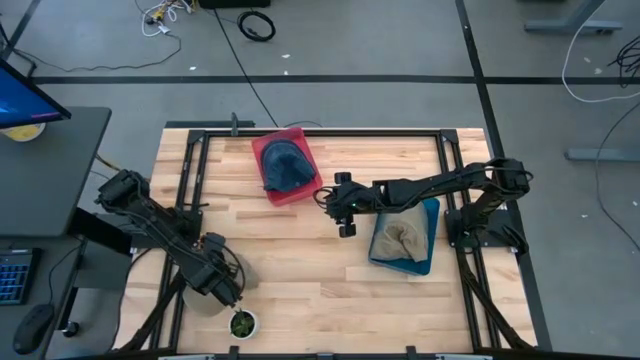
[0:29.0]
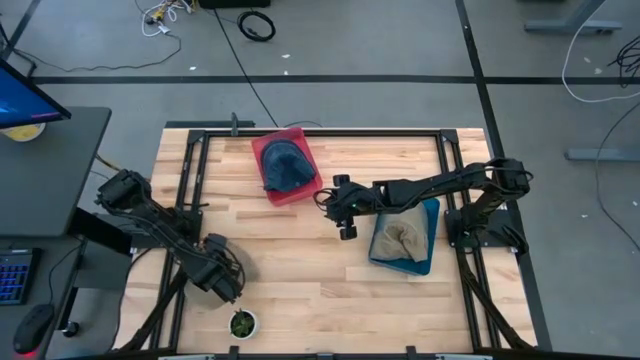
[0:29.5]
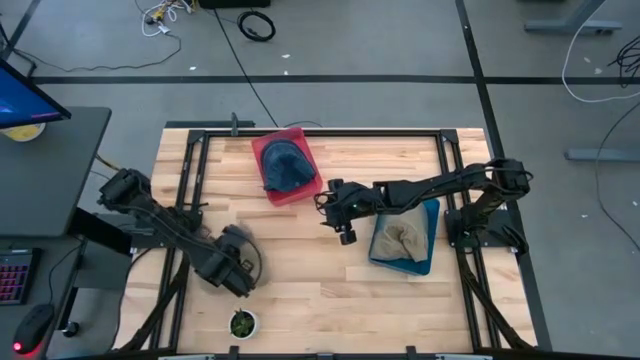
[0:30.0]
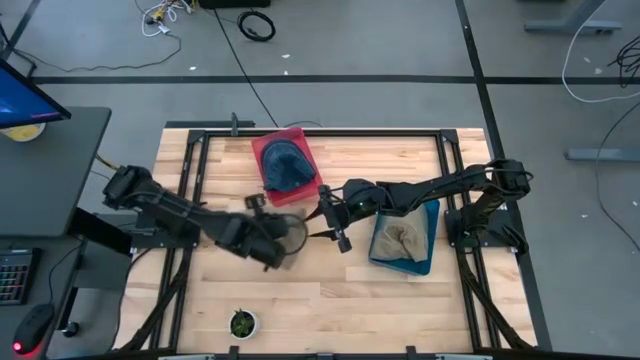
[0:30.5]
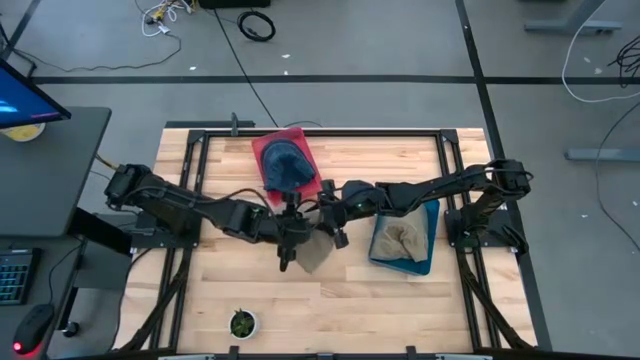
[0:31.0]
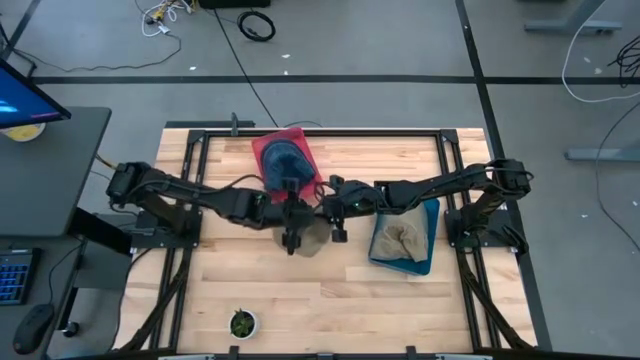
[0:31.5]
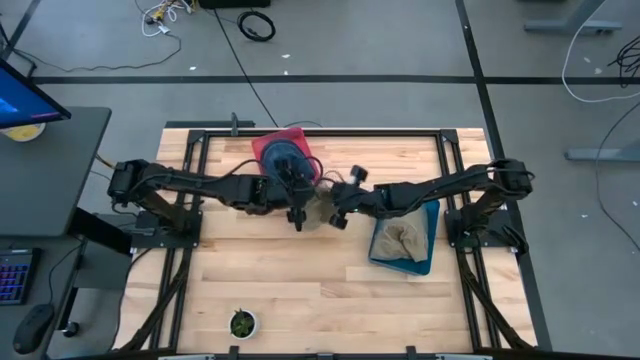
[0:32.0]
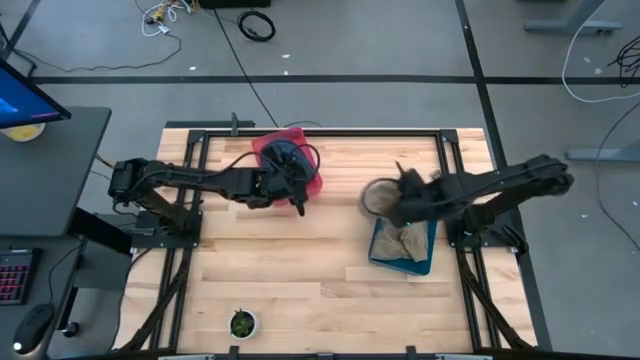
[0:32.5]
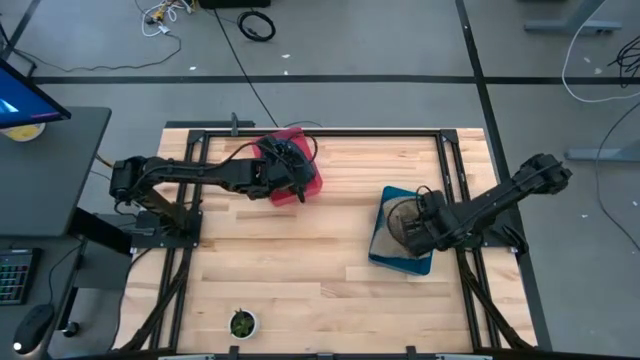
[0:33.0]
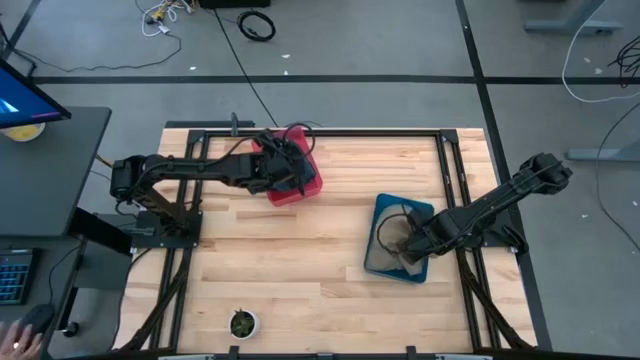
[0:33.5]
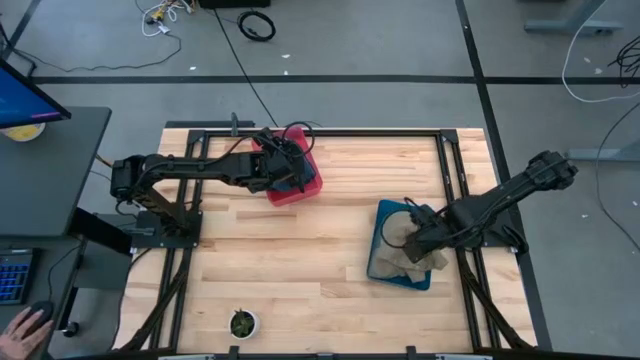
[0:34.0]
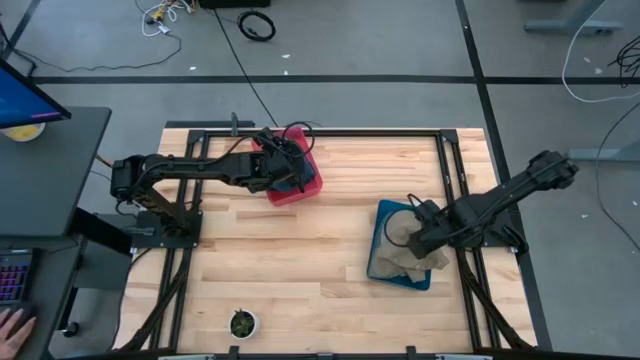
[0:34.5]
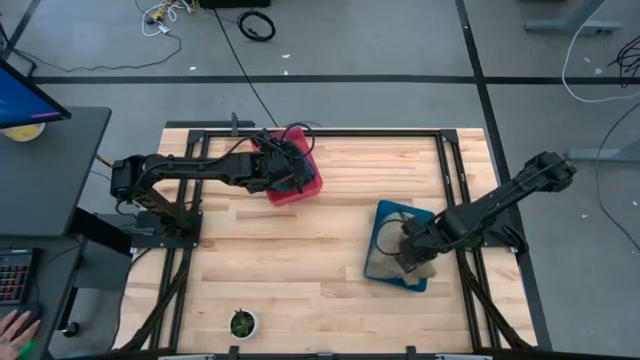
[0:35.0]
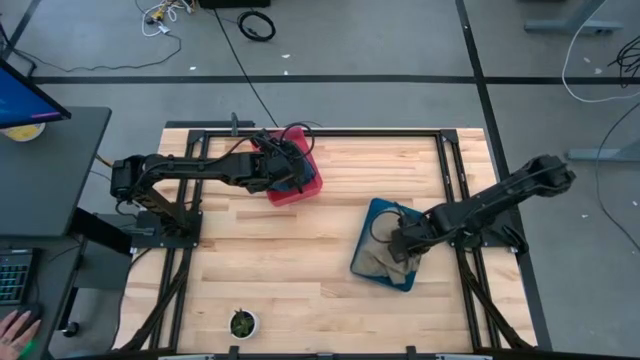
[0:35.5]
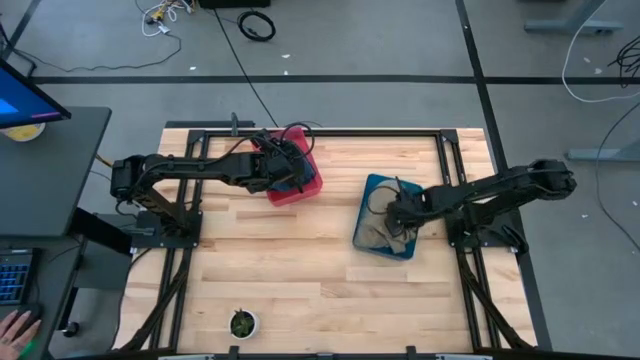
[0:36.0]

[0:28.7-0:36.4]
Task: Pick & Place hat
Put the brown cap into the blue bin

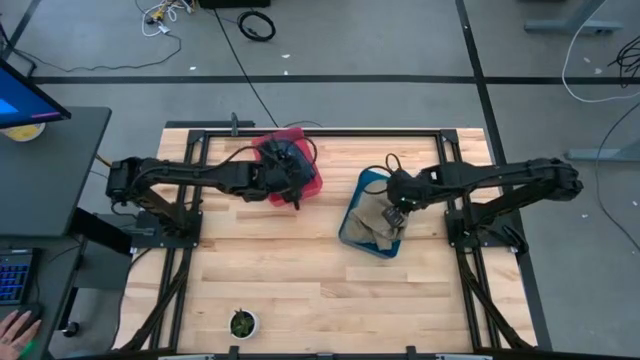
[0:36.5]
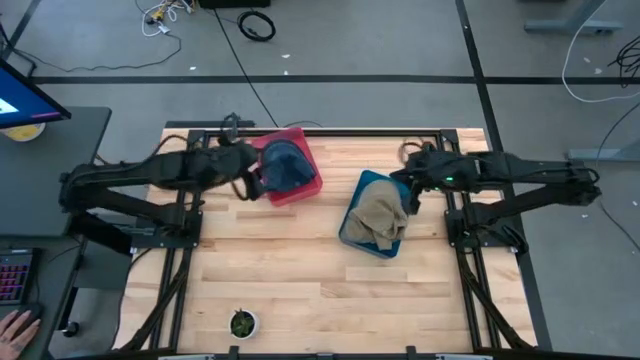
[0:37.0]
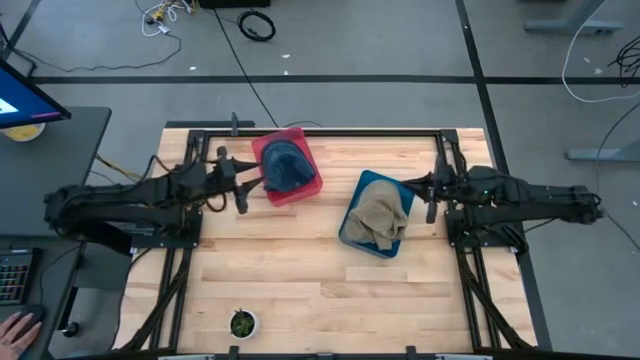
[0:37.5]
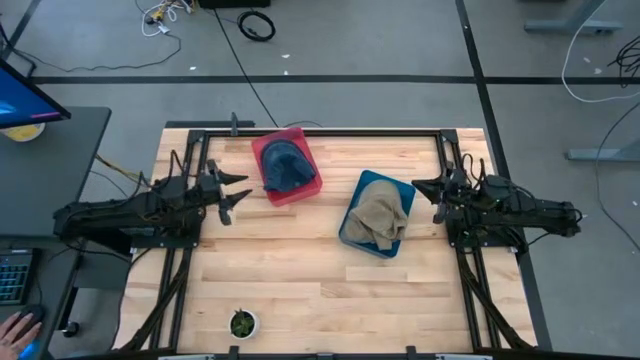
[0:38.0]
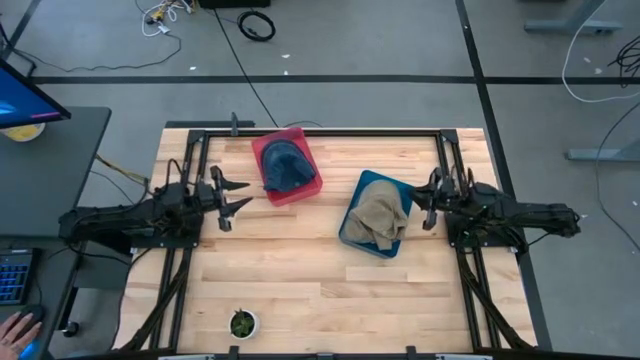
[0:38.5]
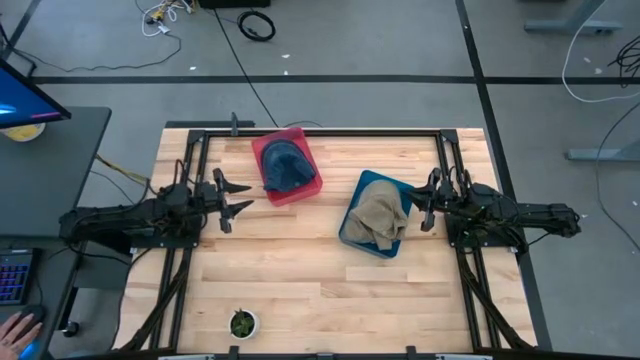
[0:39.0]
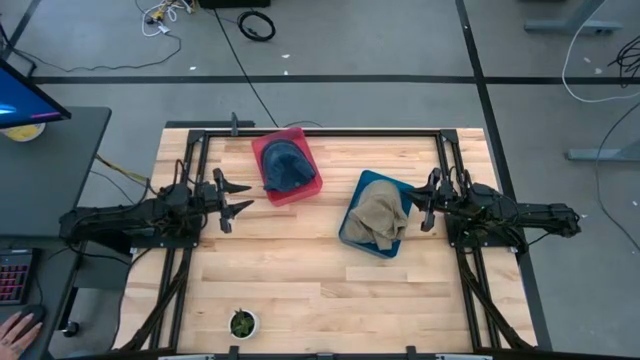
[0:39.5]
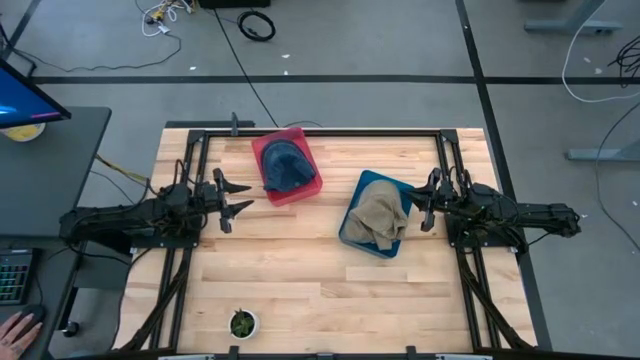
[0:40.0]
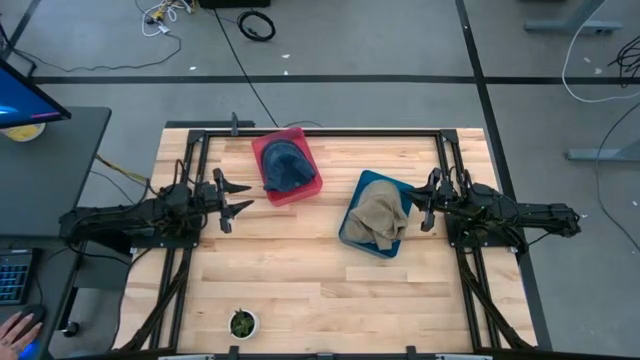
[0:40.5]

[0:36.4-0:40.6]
Return to Home Position

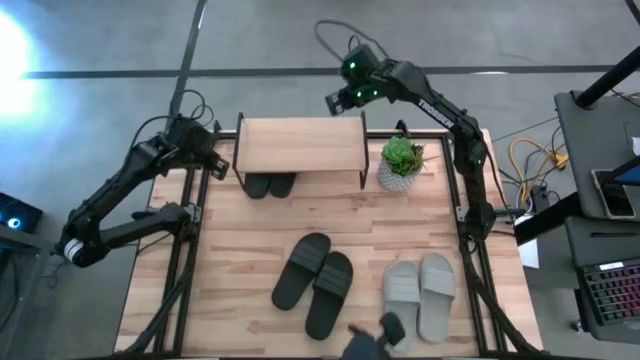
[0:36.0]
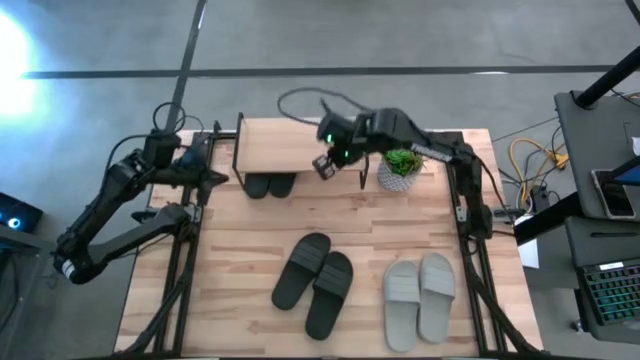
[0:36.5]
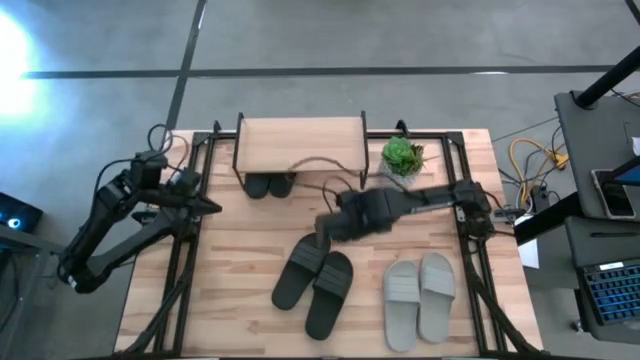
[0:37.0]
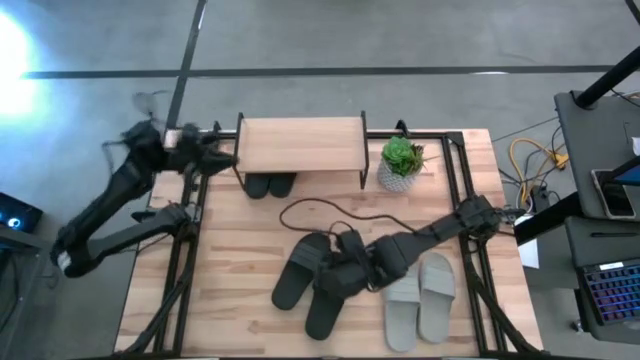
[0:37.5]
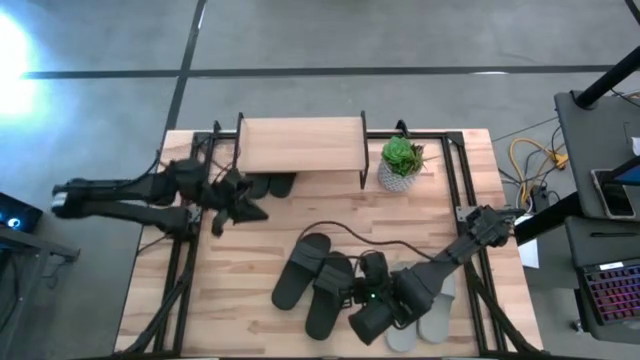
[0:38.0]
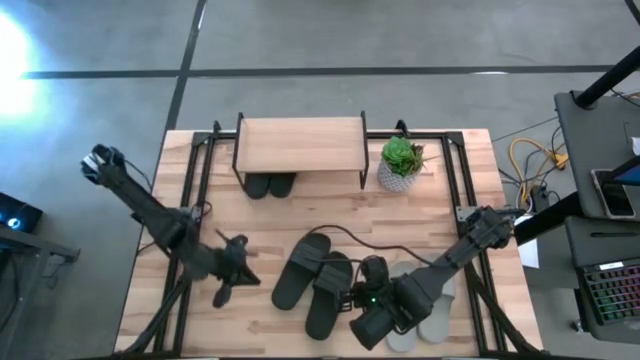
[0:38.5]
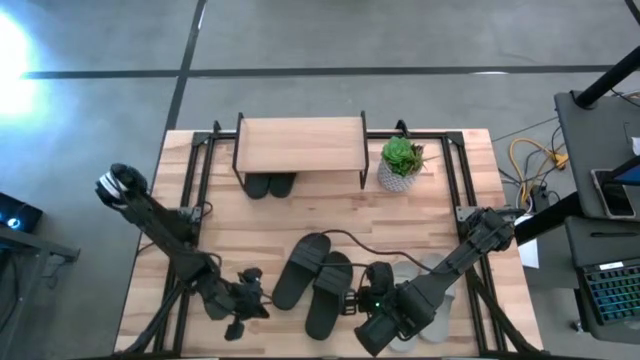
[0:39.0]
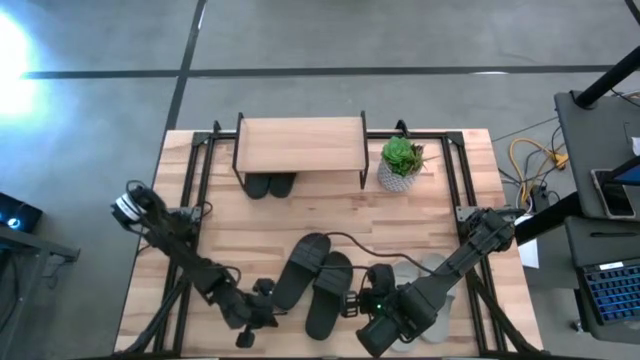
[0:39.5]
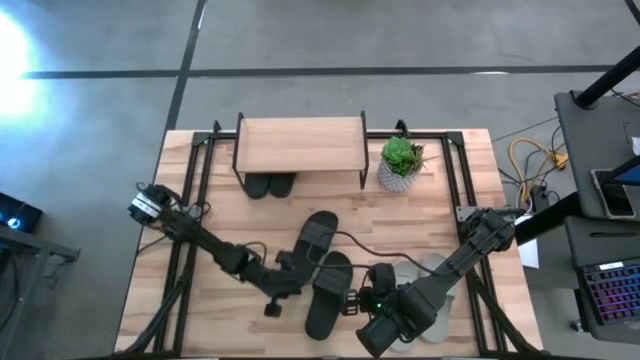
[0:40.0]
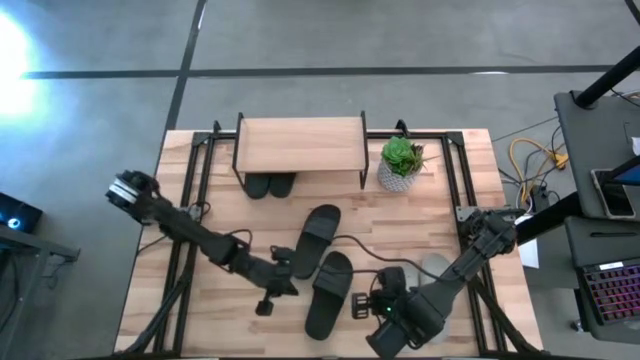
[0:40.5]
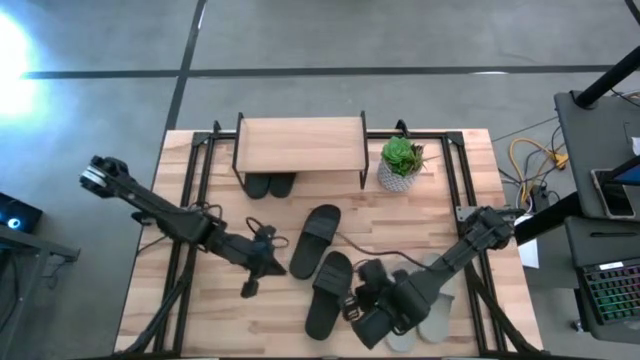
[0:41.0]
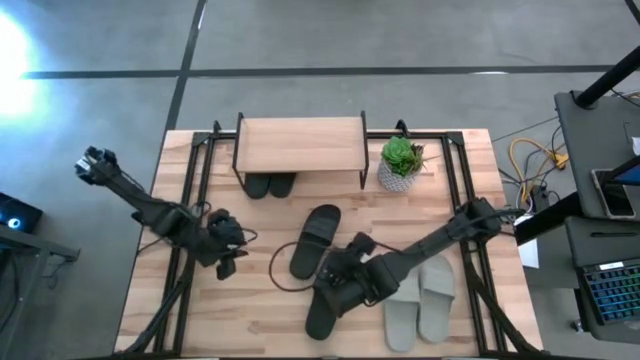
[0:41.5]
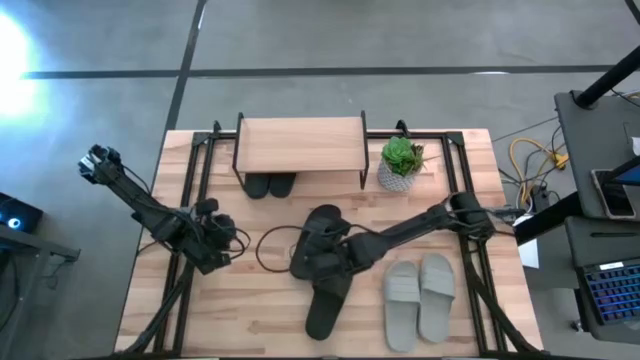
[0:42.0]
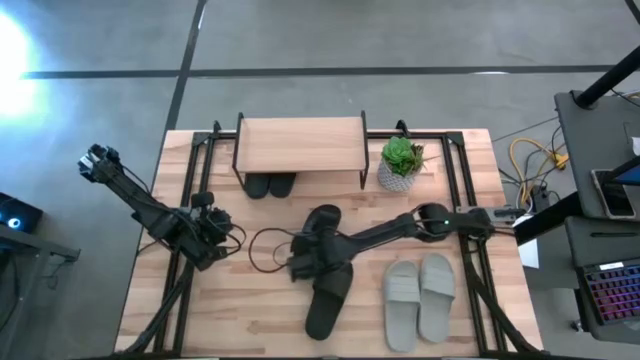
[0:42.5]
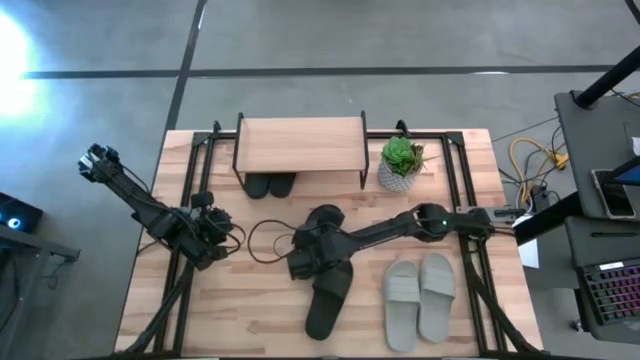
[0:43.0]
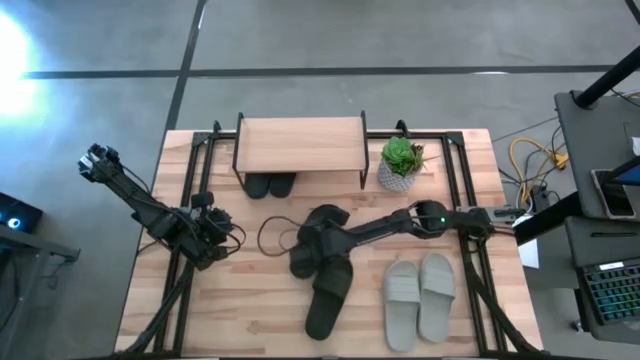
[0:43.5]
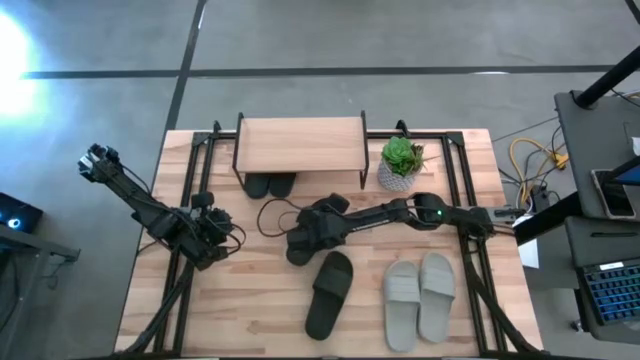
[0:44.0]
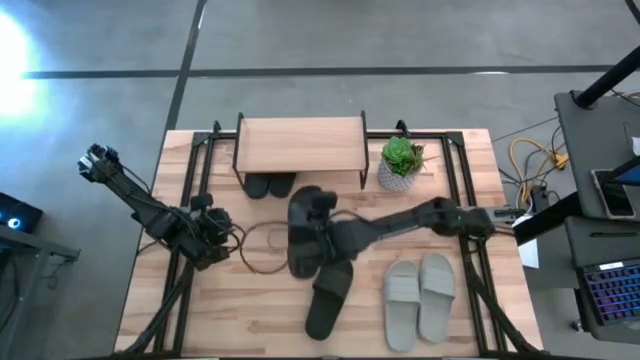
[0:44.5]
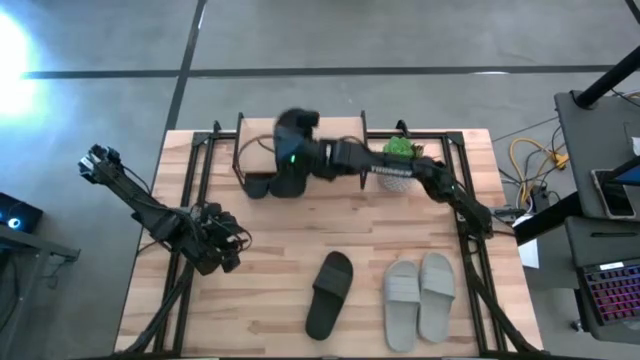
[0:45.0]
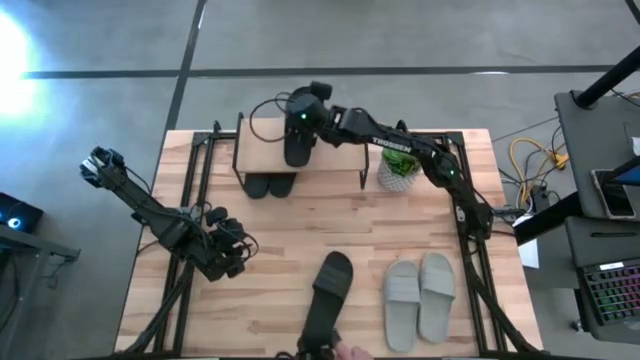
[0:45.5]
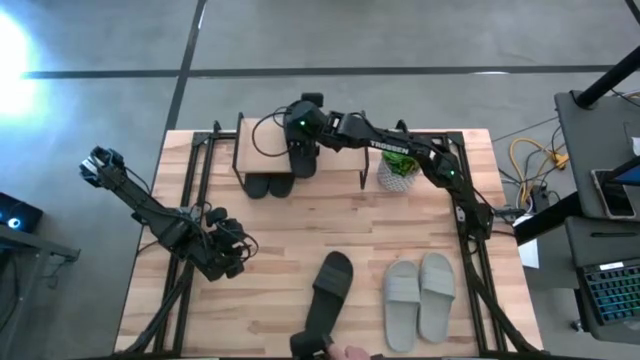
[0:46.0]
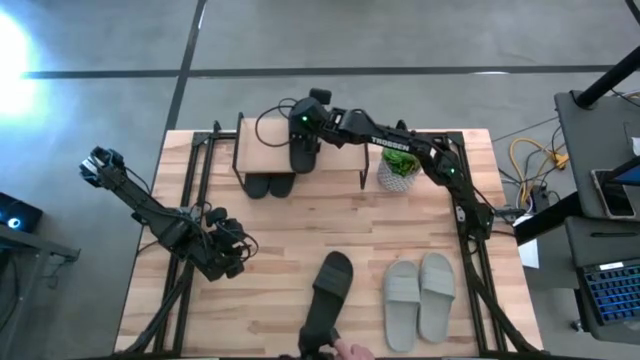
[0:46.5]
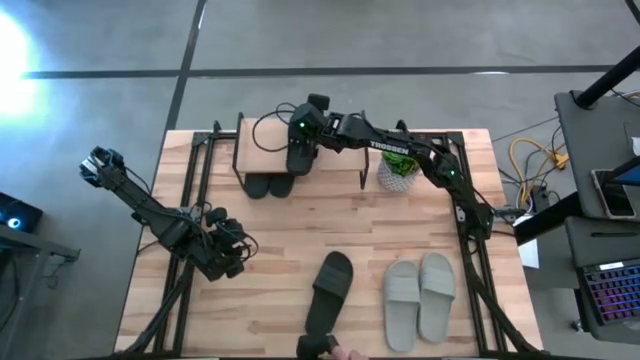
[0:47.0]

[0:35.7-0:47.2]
Task: Pick and place slides into the shelf
Put the black slide on the shelf
